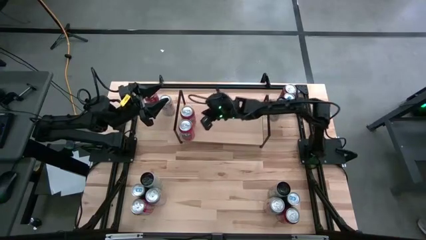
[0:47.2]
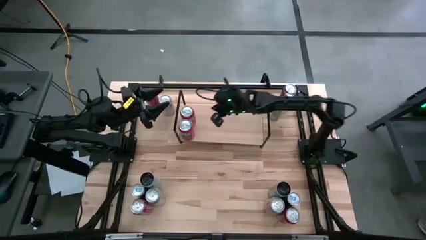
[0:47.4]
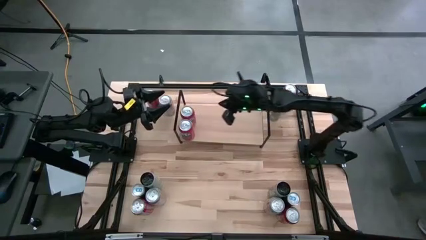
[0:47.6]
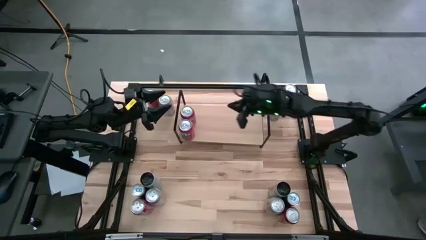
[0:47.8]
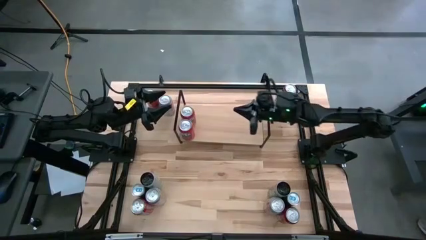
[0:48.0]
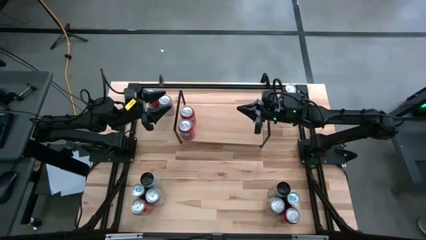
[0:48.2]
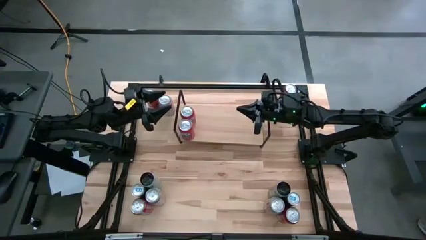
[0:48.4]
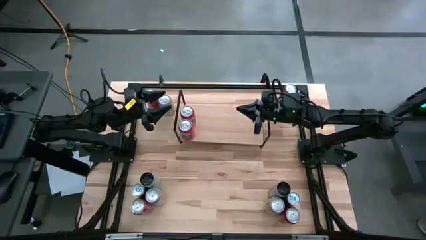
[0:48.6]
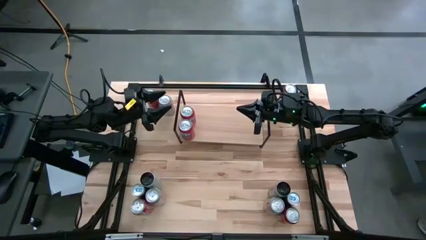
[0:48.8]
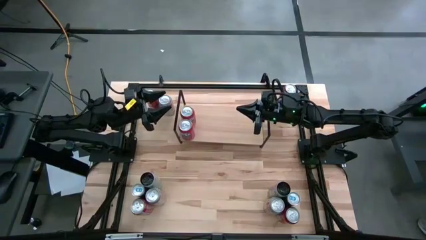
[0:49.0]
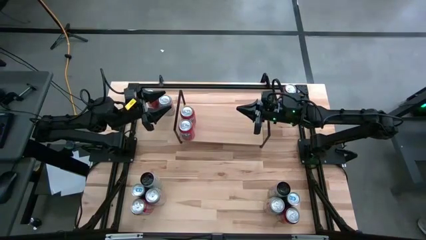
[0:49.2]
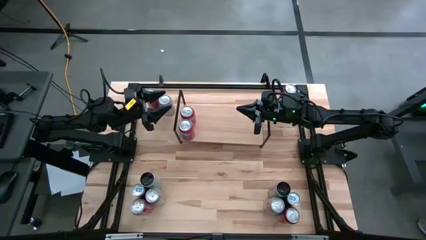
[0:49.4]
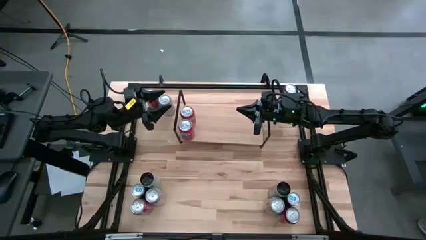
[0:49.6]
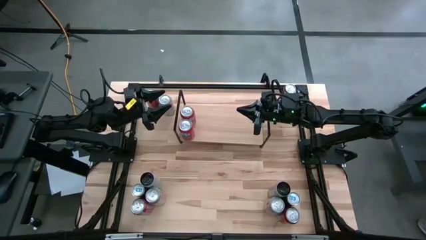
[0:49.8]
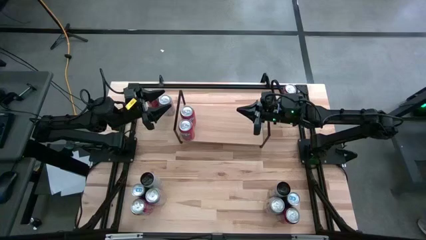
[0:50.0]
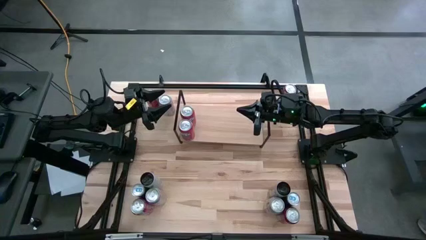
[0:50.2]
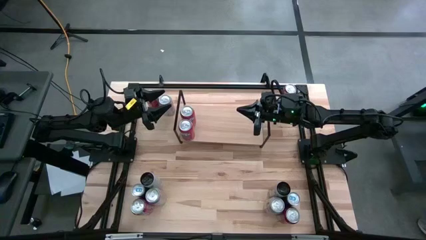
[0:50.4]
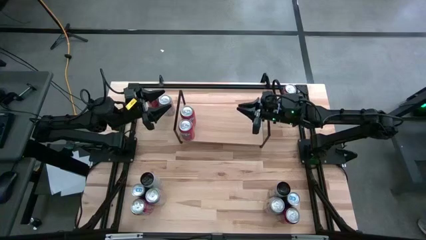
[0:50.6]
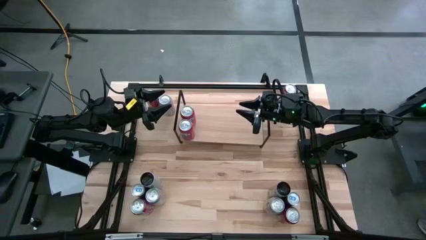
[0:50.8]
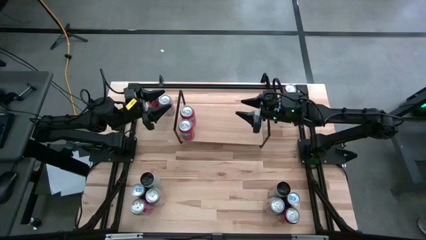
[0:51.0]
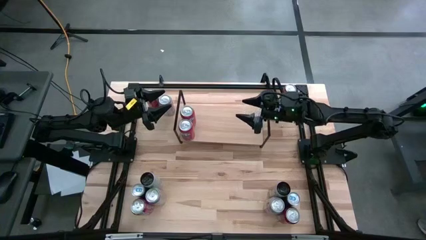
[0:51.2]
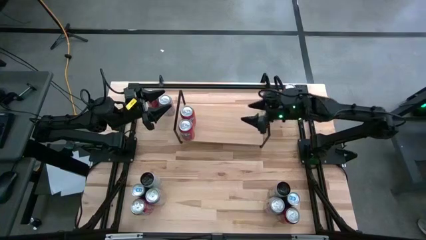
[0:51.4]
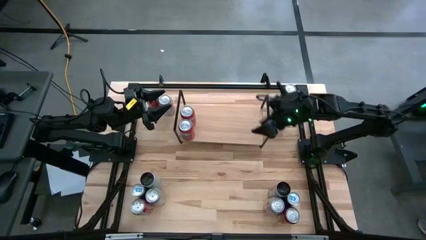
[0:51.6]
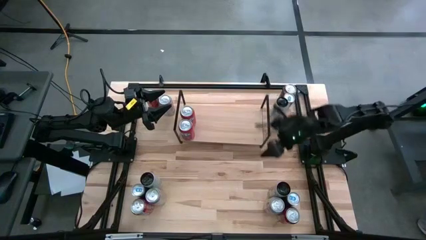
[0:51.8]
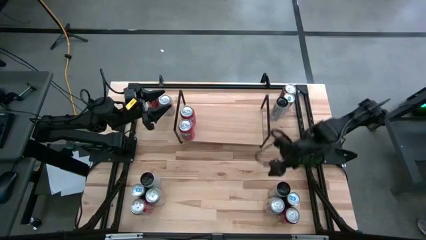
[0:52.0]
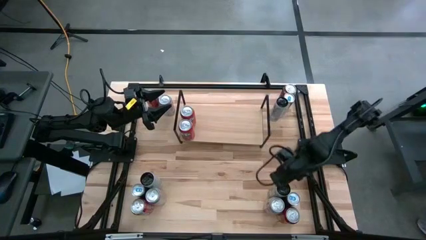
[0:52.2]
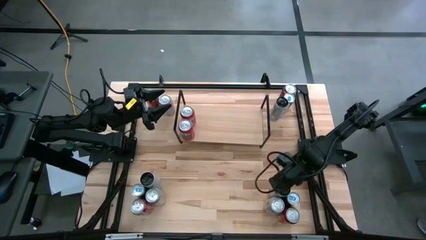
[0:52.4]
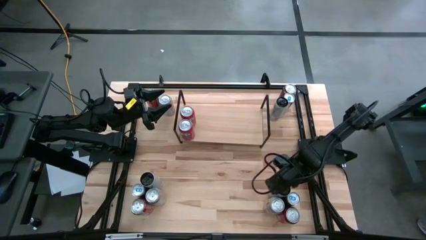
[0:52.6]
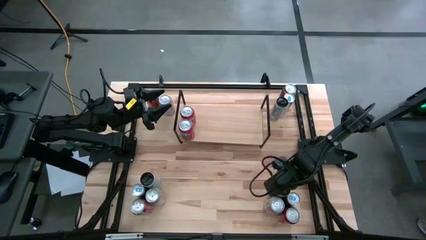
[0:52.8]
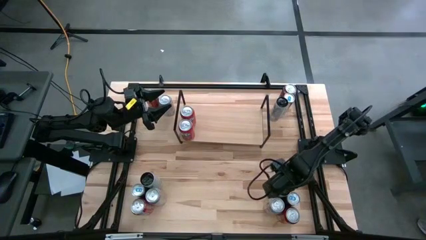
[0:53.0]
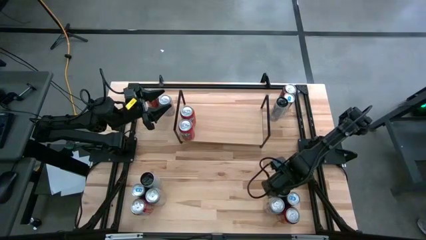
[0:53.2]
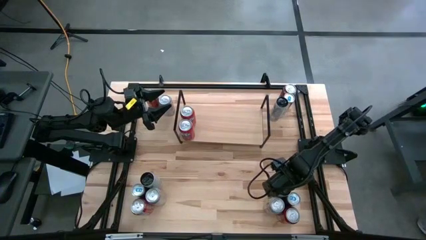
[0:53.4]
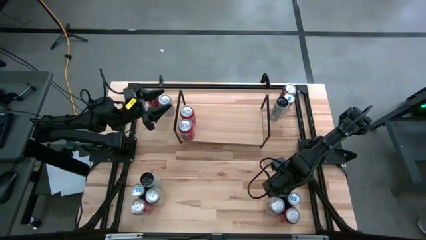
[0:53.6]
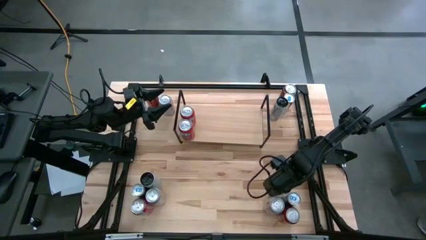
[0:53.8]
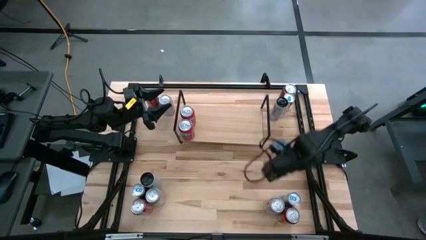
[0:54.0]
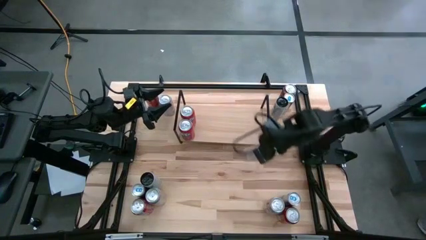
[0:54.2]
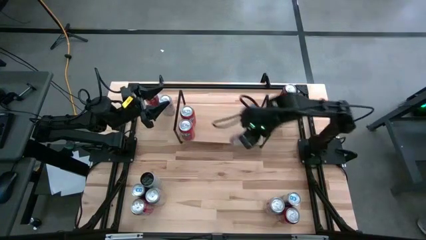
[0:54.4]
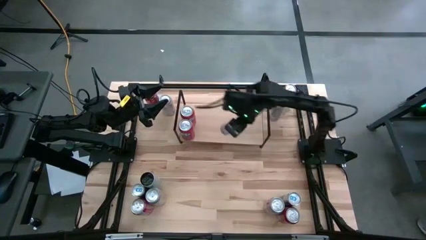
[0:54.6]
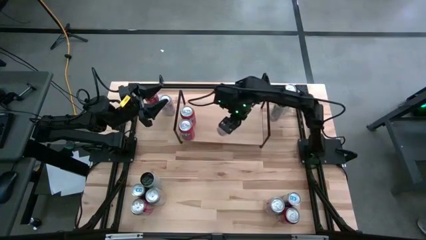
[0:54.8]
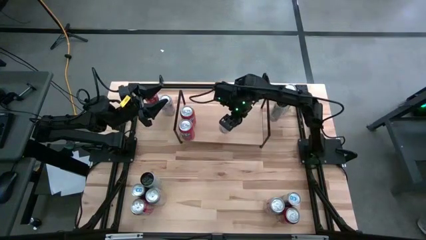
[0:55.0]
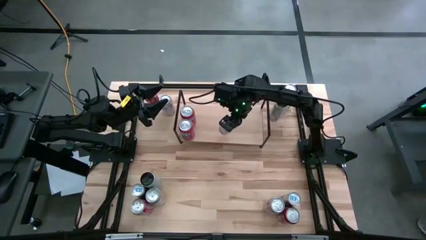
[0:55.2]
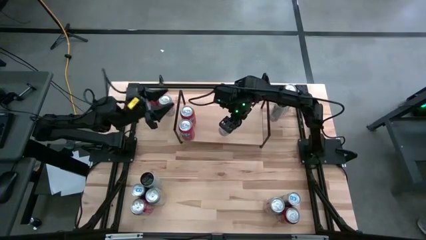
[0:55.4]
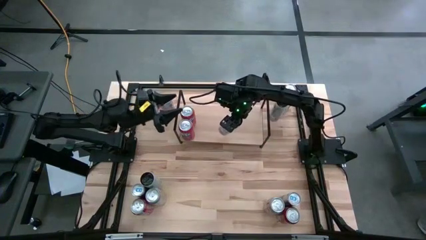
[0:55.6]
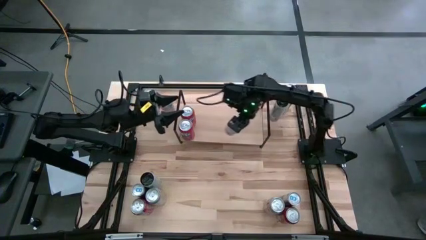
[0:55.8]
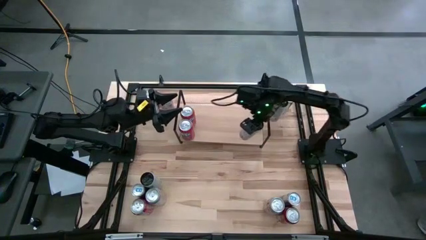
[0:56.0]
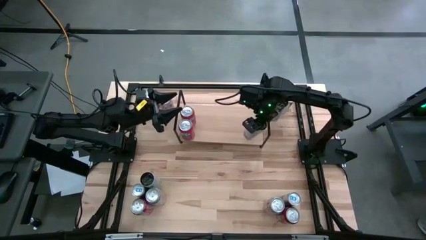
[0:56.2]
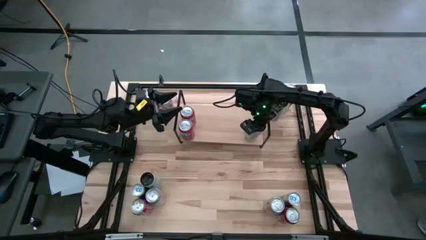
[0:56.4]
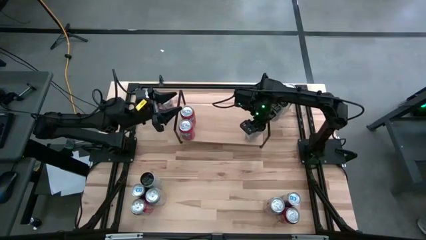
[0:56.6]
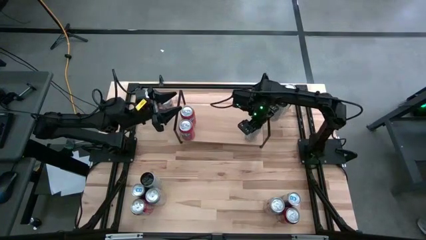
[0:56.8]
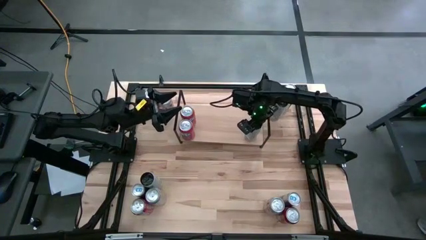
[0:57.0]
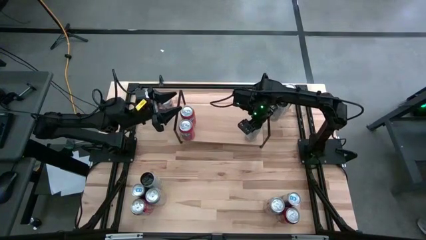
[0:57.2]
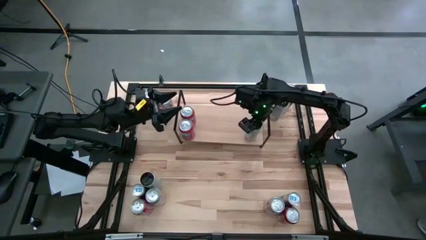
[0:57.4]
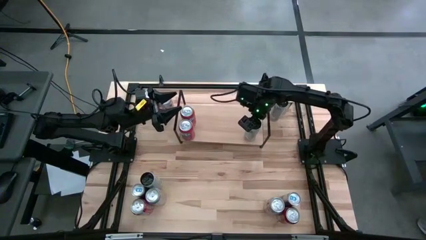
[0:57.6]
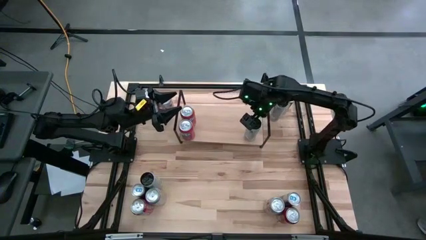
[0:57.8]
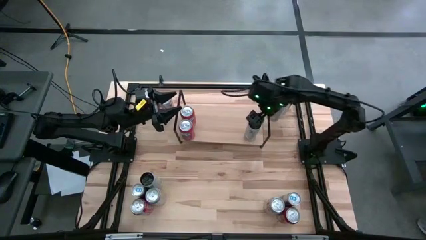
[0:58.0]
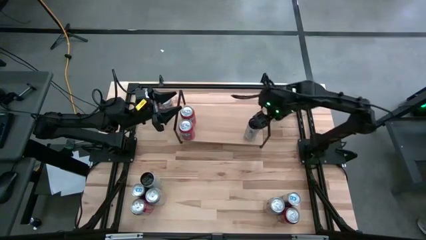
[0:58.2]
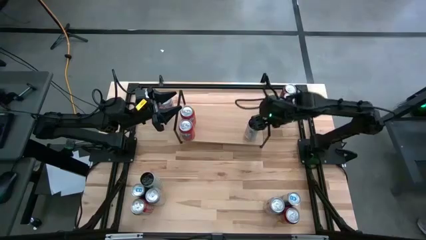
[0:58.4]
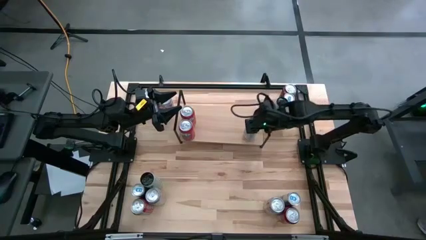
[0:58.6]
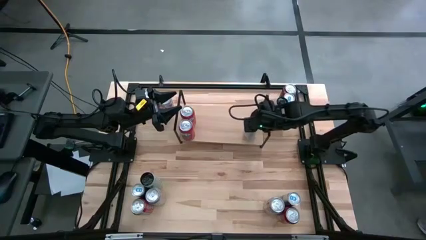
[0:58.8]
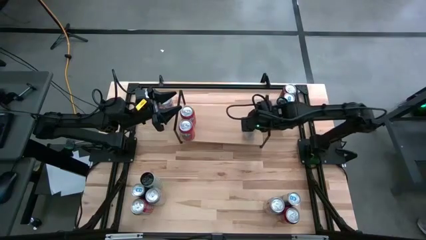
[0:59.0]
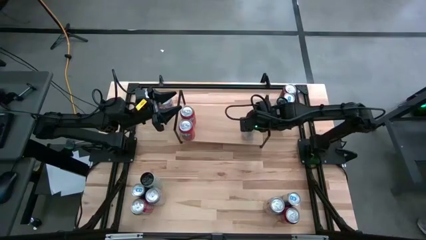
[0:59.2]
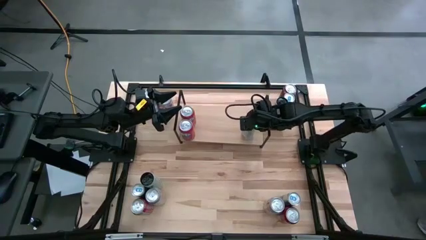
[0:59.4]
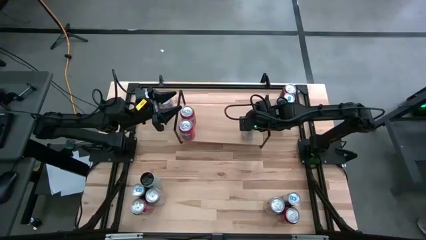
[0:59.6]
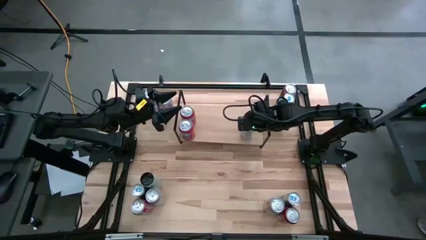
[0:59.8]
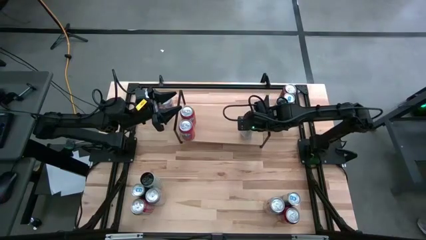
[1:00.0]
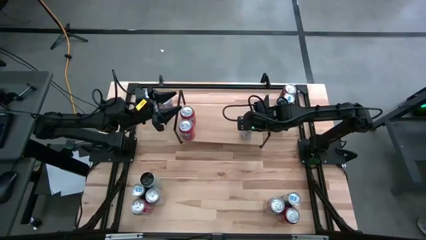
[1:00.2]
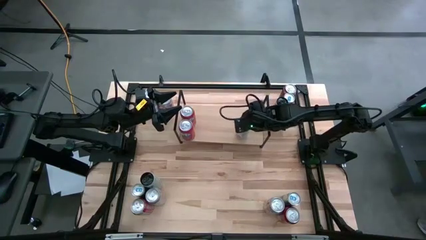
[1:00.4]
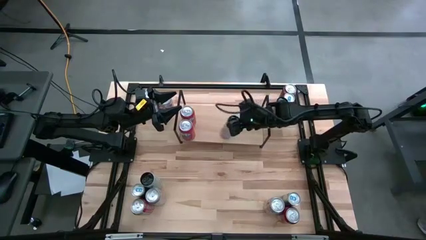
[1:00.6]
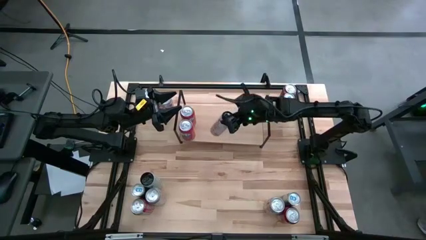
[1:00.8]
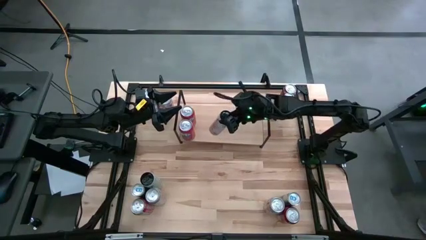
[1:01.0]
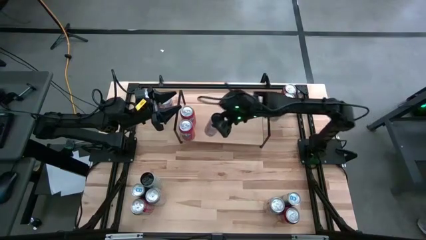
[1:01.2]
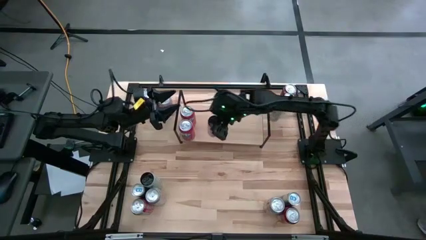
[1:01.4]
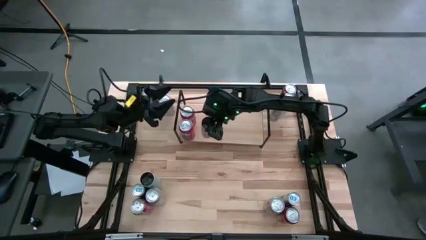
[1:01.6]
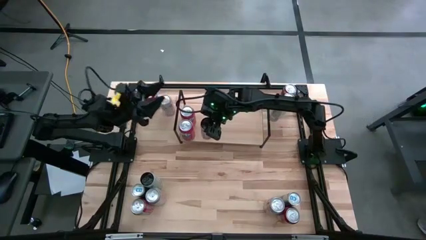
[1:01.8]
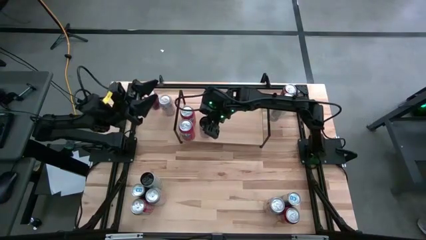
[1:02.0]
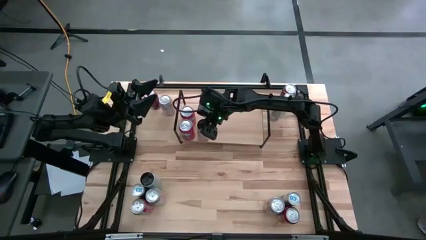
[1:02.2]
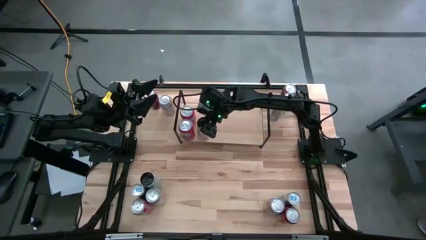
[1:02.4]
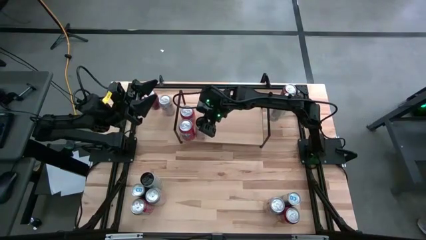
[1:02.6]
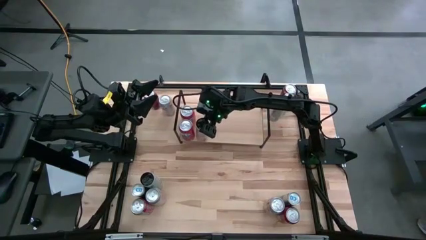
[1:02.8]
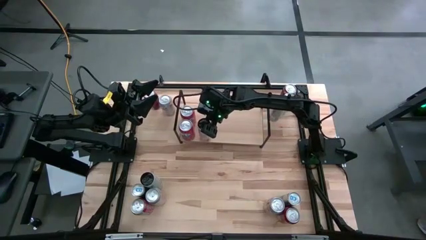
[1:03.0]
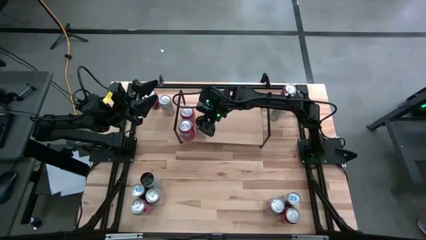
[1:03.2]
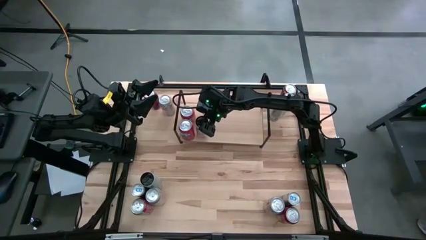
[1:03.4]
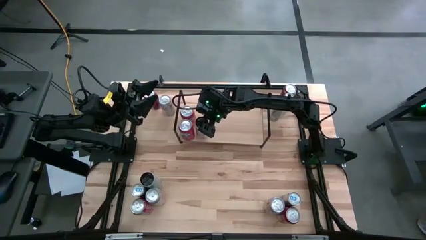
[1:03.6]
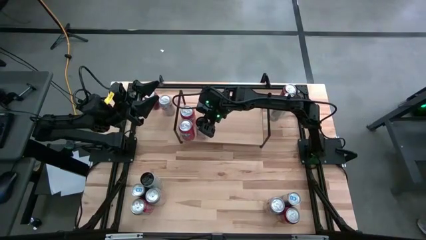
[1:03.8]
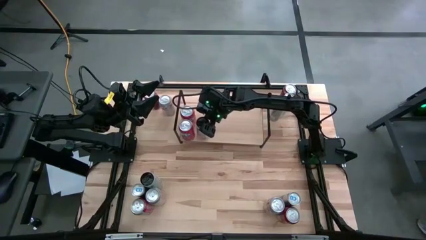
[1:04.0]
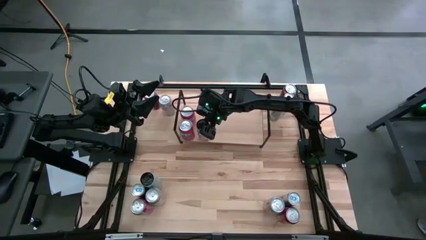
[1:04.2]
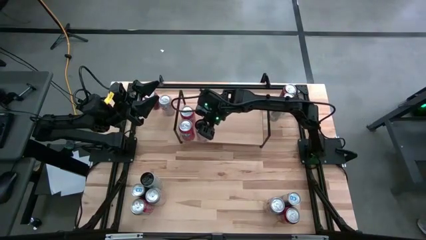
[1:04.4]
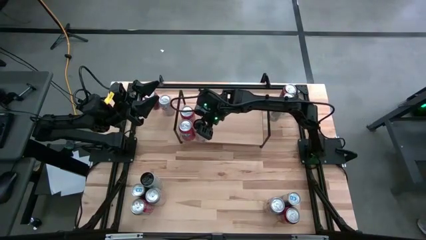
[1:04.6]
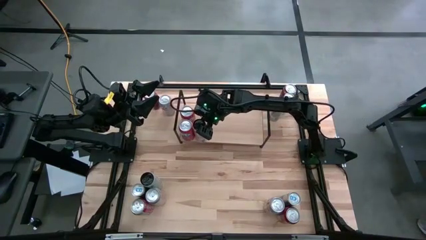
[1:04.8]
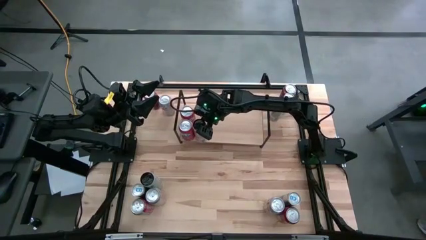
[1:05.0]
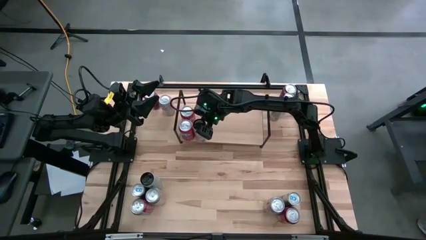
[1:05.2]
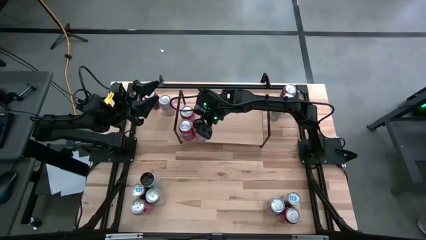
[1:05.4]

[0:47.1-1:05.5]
Task: Place canned beverage on shelf
Put the bottom right white-pink soda can on the shelf
